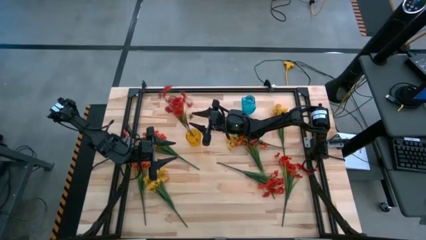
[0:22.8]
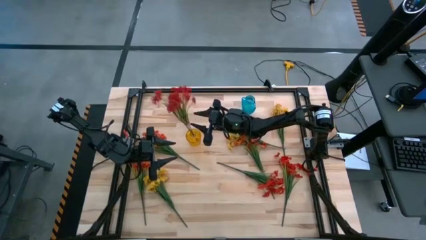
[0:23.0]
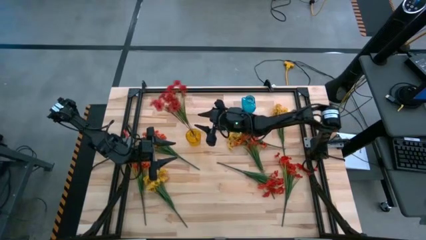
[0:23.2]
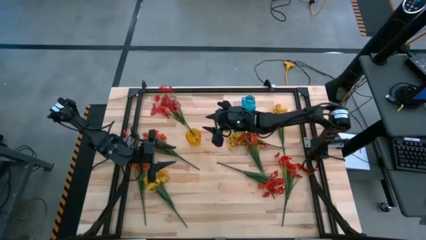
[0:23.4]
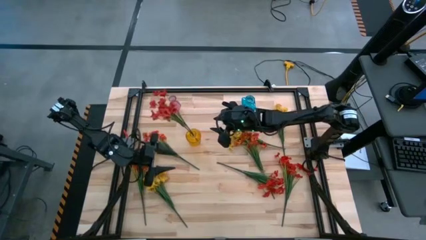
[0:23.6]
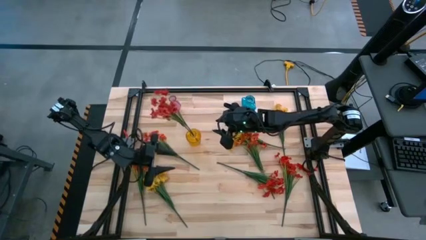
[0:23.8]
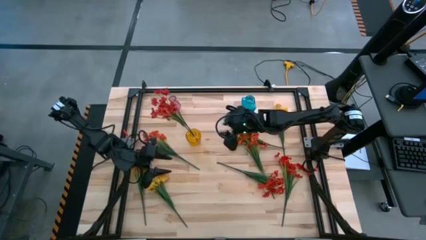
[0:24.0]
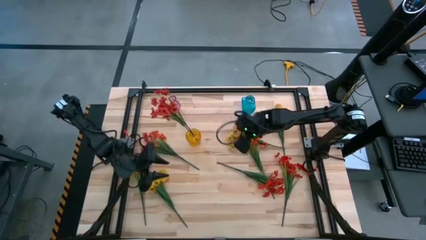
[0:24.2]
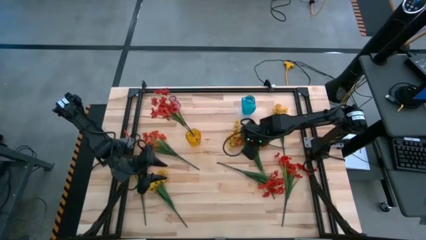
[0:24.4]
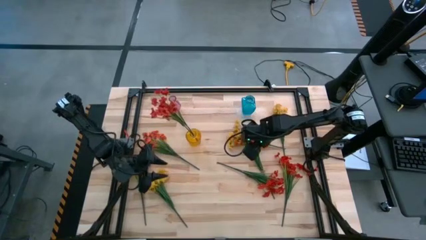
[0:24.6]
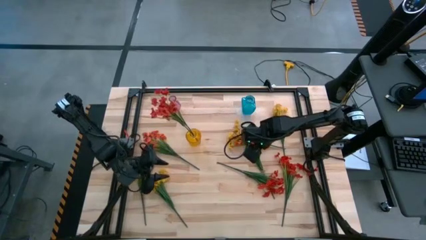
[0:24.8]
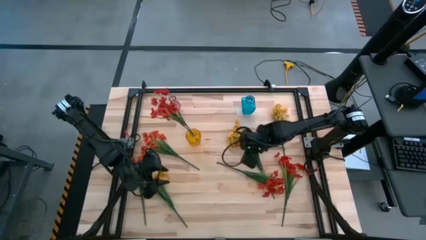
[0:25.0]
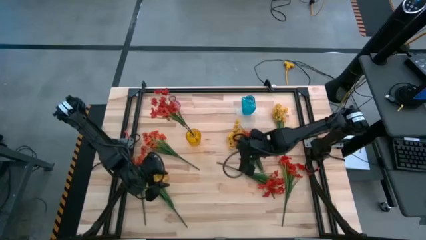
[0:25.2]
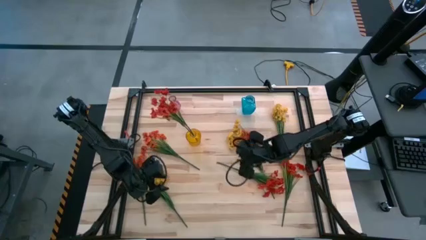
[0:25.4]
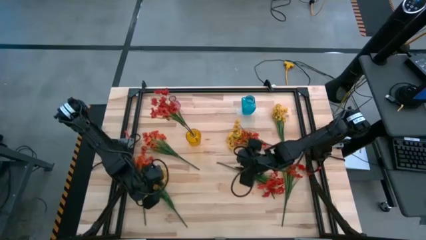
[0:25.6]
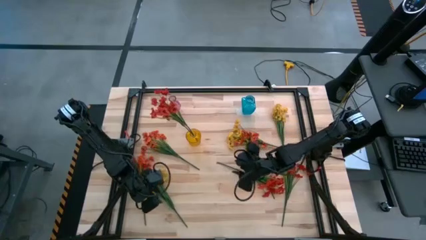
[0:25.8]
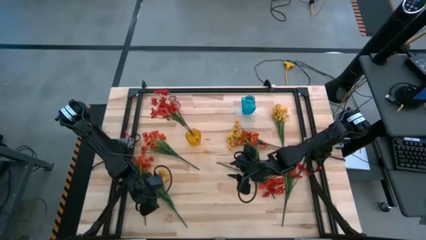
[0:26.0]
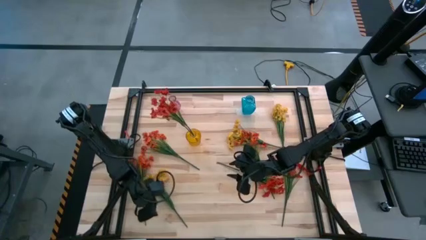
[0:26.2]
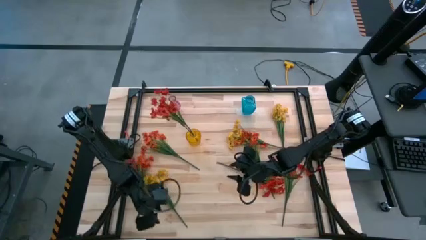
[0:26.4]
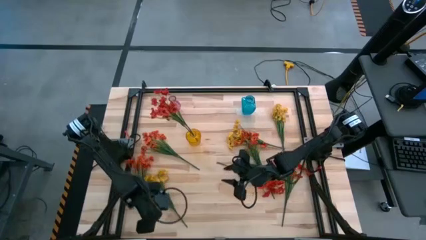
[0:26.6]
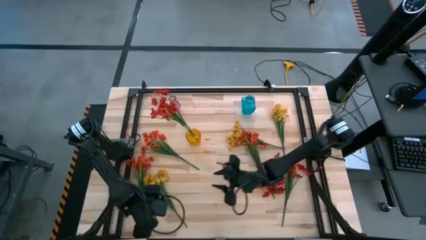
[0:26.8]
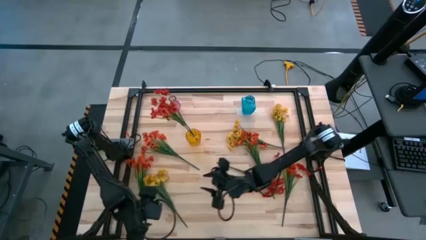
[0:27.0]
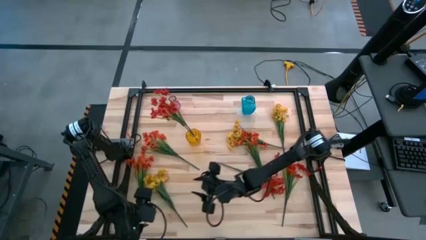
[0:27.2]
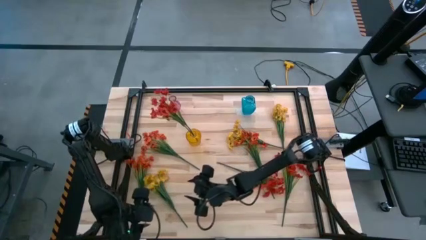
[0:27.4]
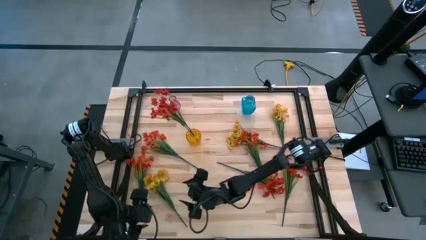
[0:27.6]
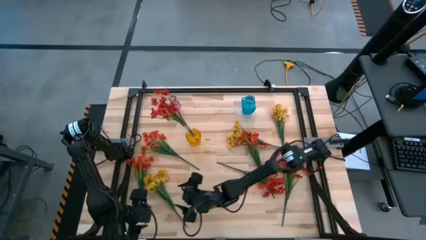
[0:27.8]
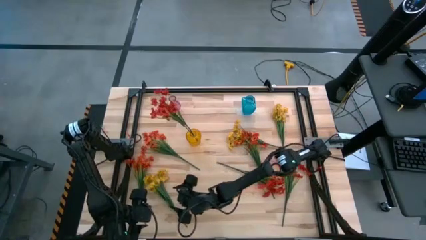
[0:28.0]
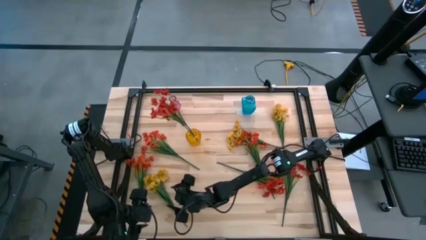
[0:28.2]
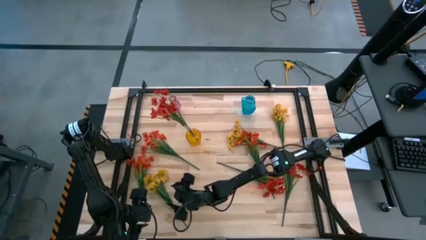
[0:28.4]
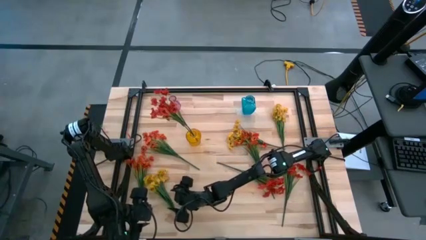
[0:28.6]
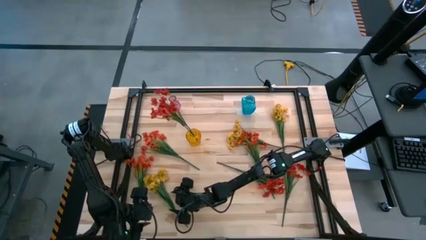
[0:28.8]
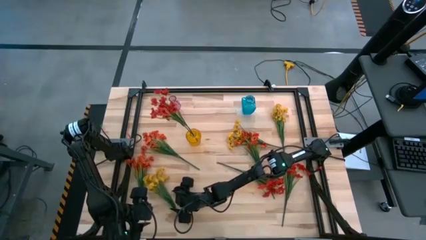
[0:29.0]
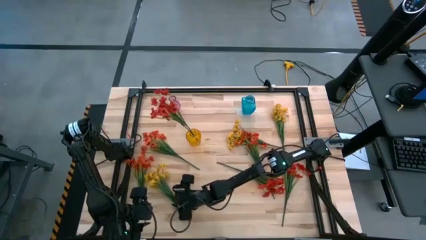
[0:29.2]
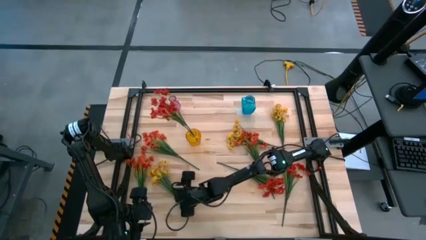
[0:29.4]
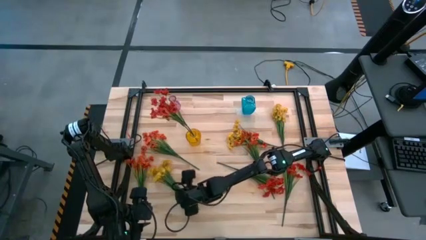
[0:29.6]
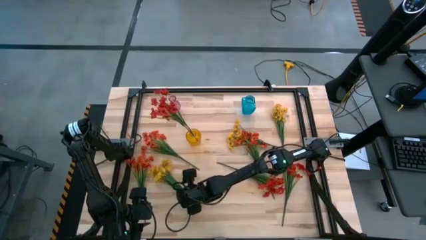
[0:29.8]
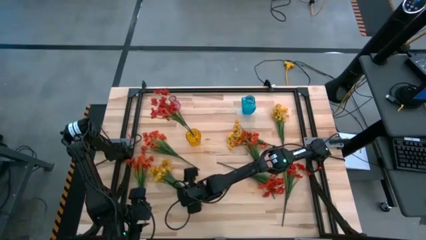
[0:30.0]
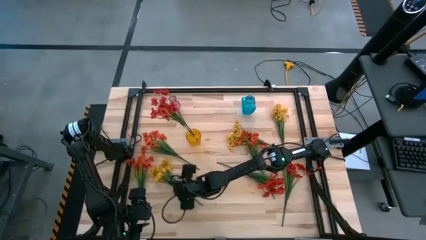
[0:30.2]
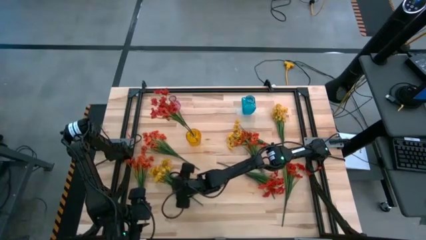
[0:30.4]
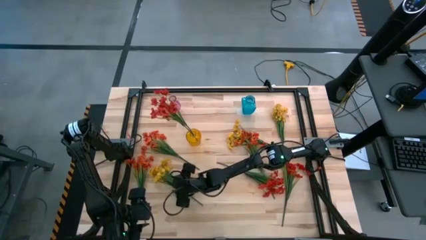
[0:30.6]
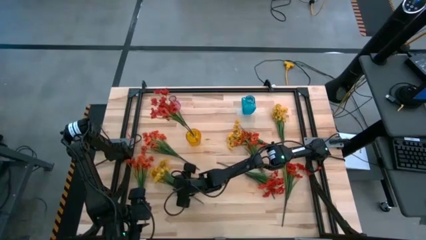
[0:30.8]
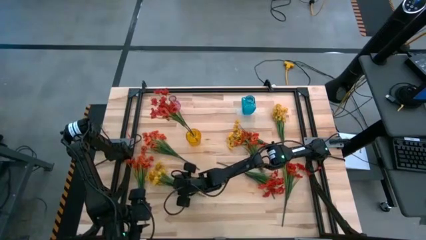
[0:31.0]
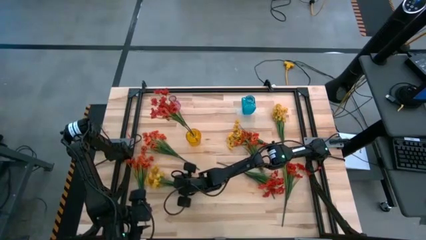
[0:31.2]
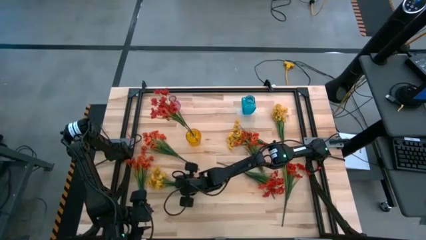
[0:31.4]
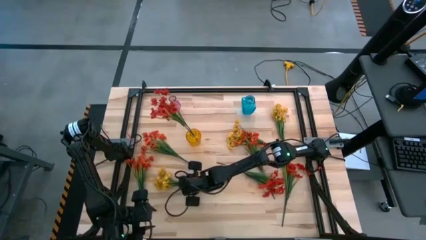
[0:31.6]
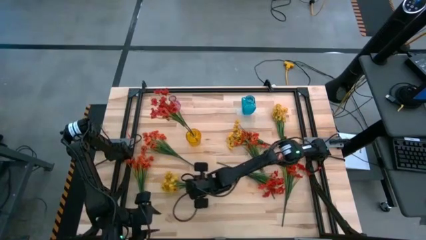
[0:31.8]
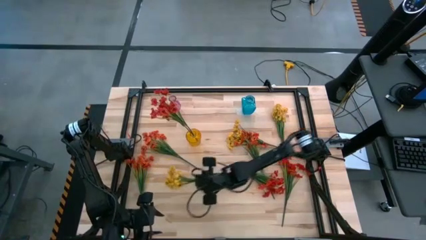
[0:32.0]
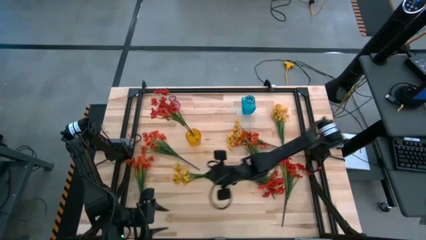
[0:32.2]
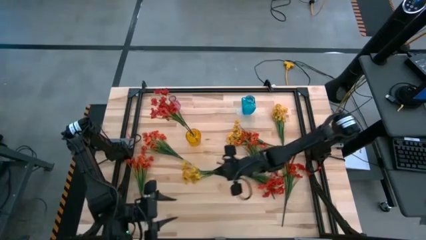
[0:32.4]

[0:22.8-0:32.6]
Task: Sort flowers into vase by color
Put the left yellow flower into the blue vase

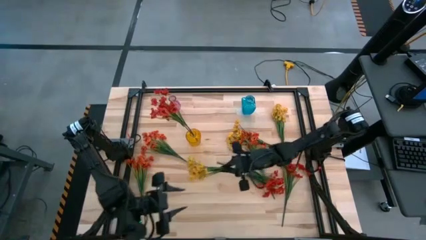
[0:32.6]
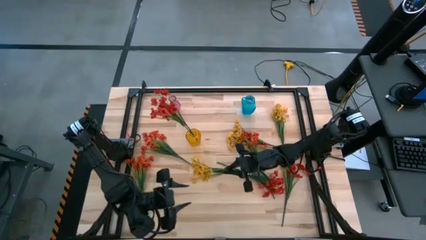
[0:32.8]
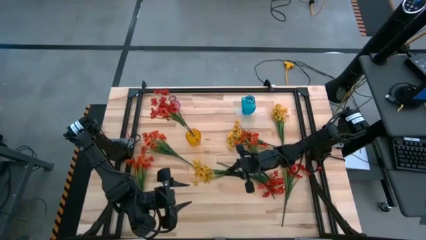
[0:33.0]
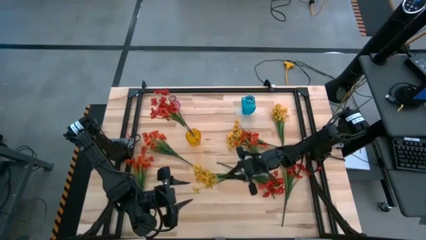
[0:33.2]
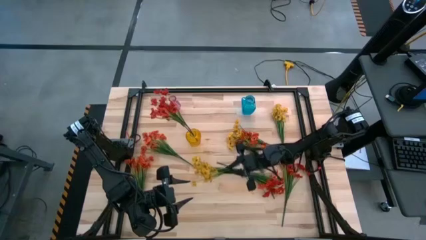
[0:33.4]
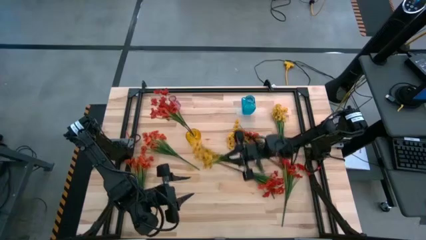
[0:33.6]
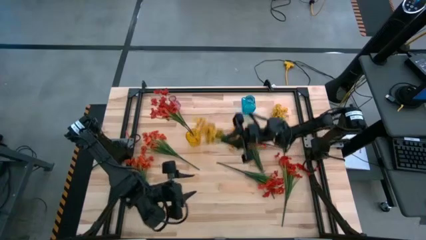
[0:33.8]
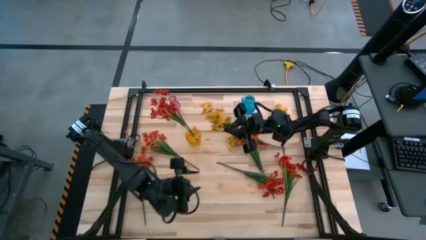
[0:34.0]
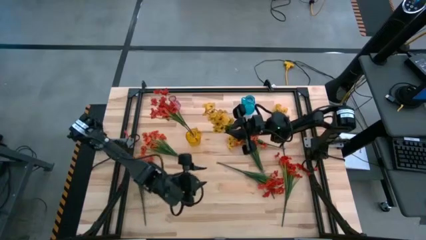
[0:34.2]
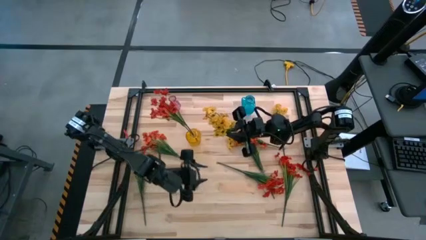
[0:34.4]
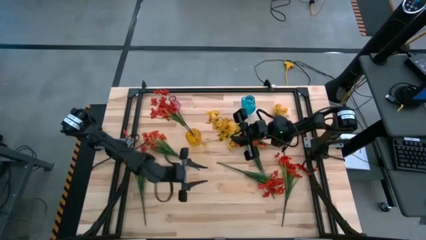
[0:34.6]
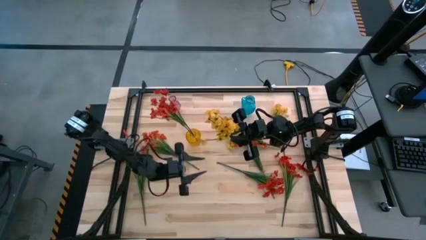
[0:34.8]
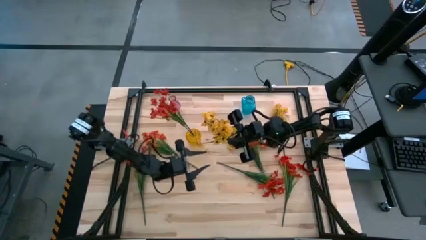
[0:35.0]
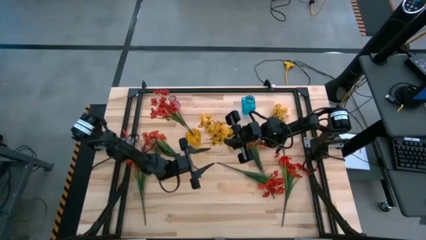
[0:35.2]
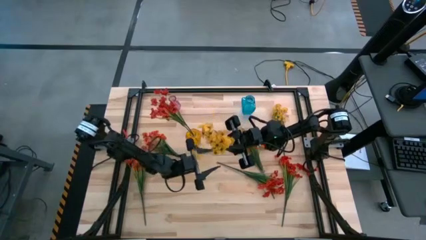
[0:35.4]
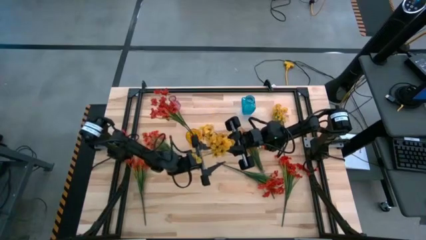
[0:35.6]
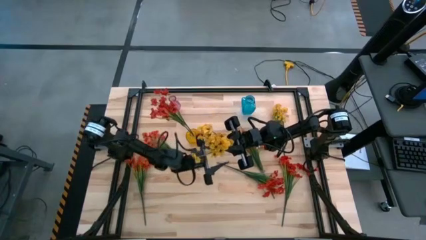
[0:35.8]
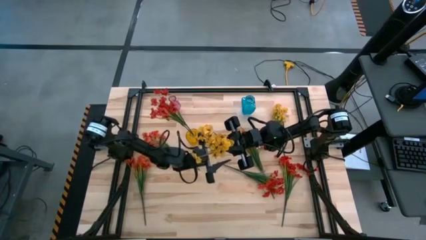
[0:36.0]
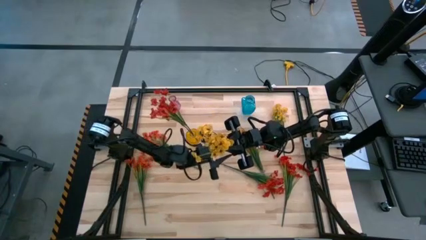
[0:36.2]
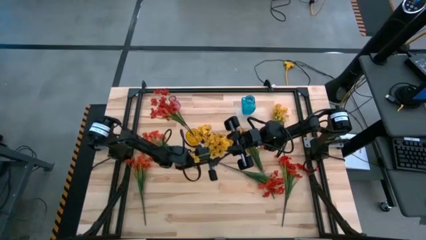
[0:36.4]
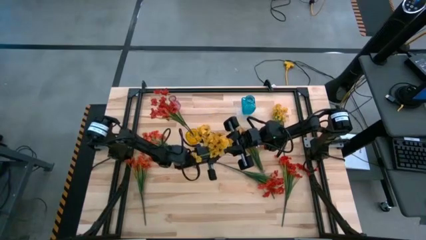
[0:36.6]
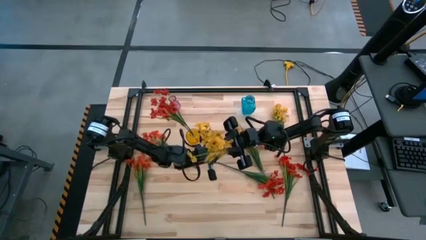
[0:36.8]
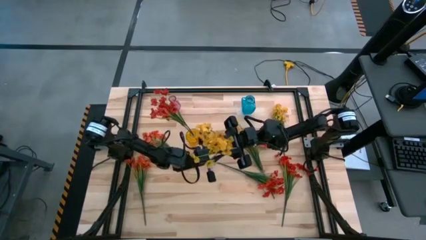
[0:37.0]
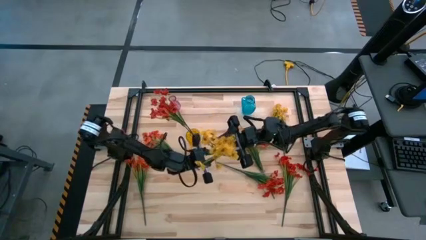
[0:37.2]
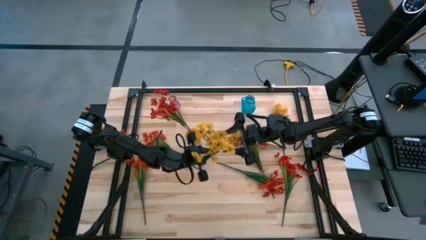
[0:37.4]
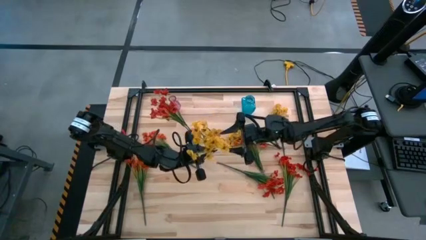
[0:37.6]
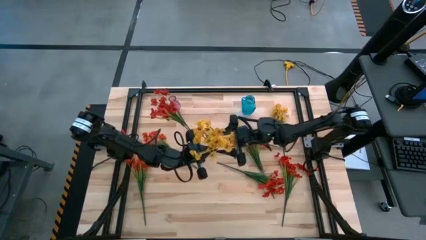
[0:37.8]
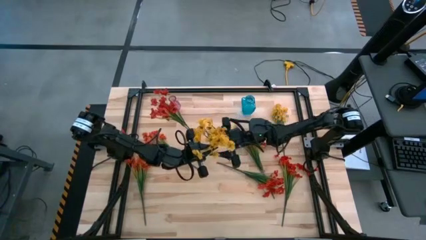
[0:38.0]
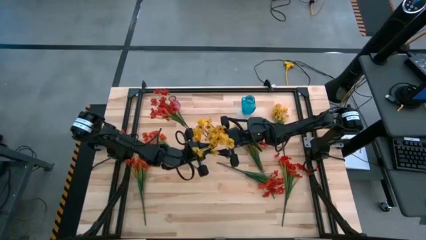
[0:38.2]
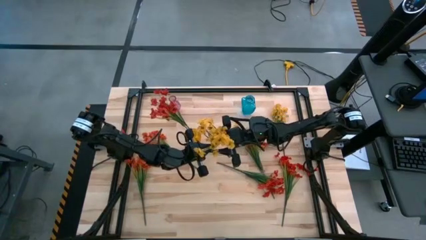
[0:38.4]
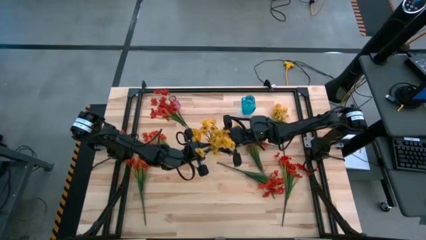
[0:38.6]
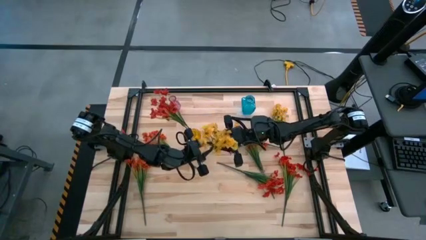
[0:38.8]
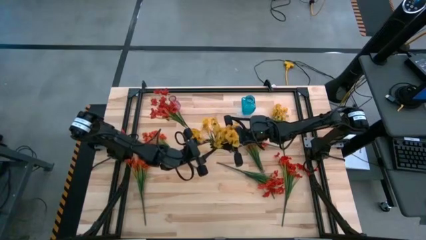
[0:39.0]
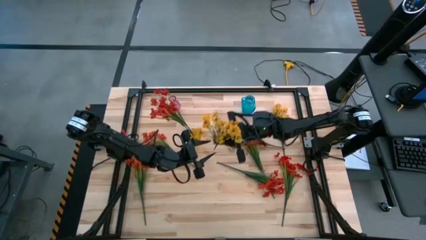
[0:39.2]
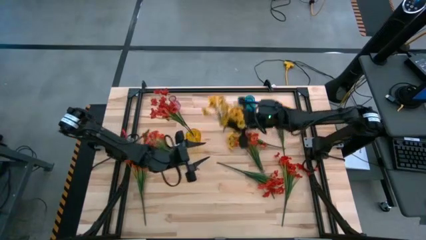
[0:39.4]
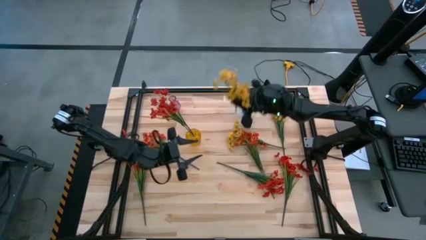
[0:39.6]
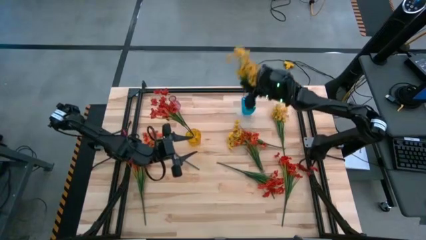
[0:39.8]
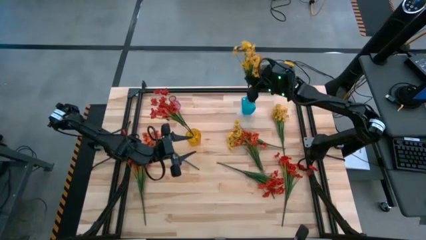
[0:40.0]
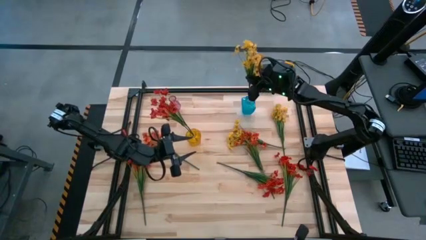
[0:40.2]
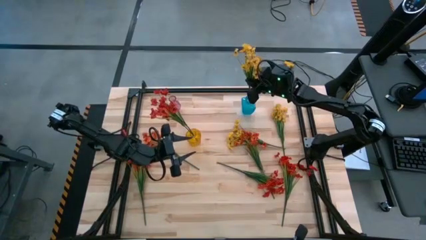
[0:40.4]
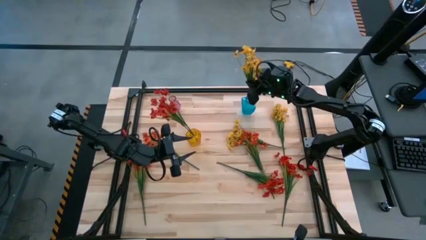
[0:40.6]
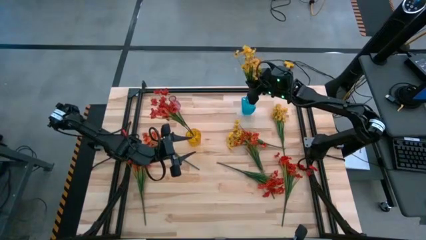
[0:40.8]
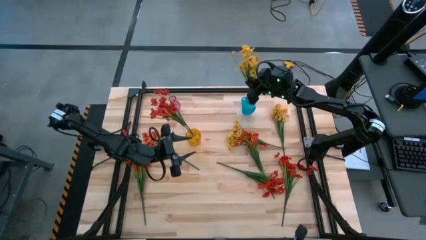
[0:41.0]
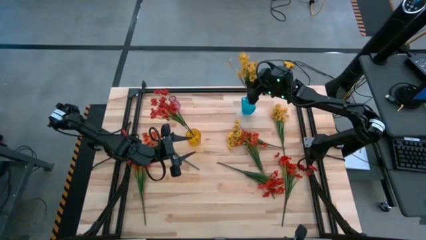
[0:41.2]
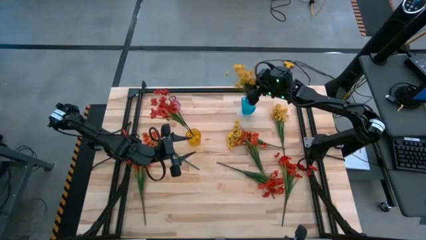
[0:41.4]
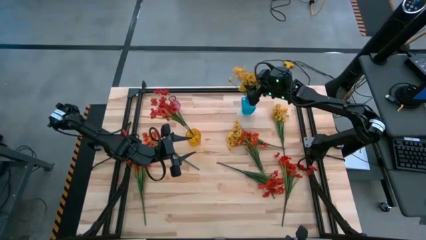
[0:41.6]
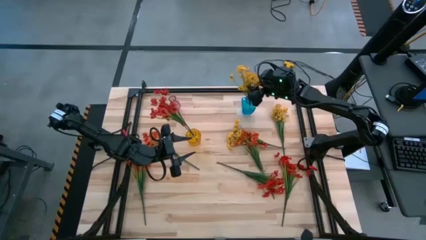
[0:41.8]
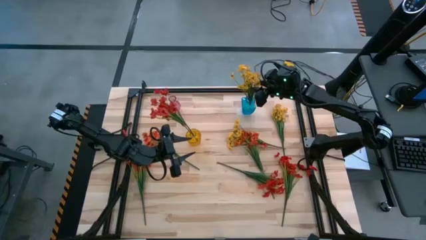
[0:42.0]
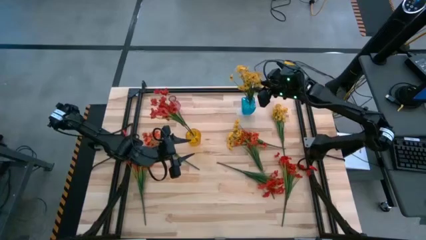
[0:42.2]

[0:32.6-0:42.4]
Put the left yellow flower into the blue vase
